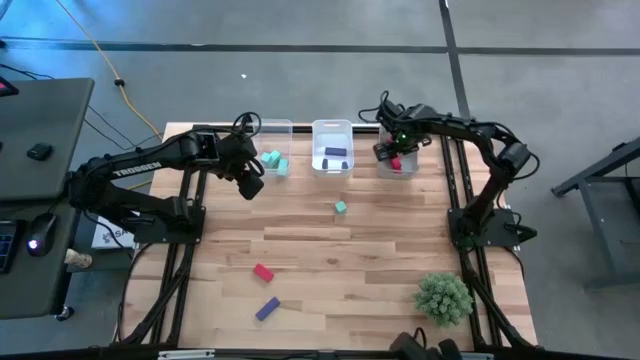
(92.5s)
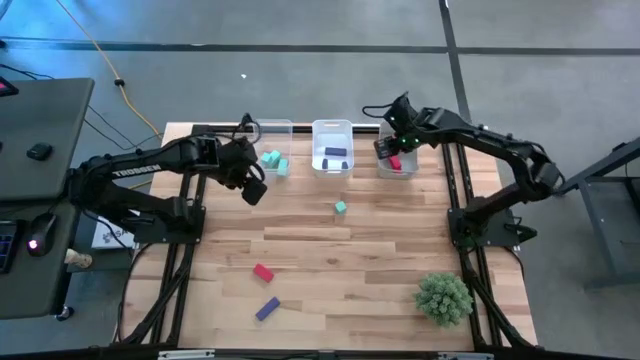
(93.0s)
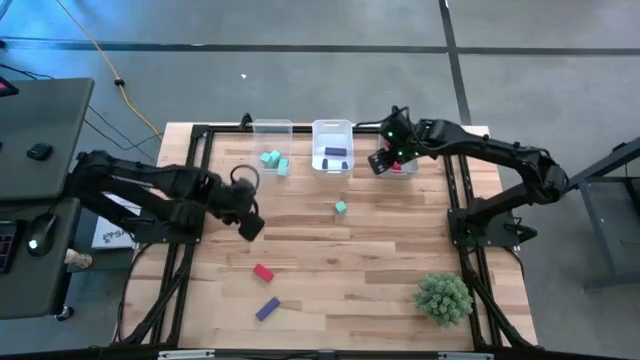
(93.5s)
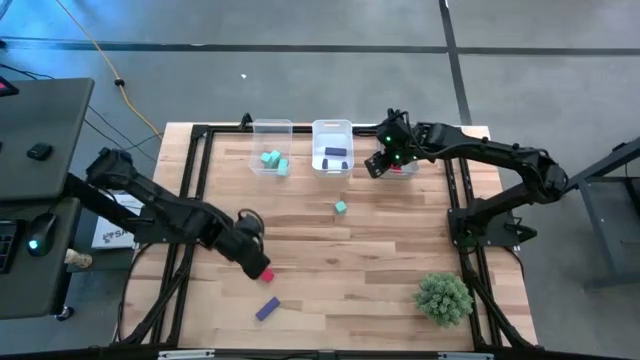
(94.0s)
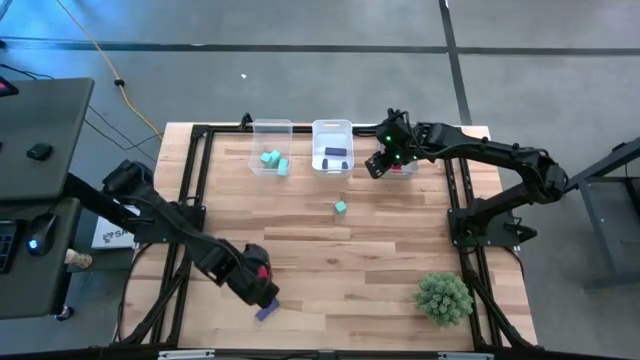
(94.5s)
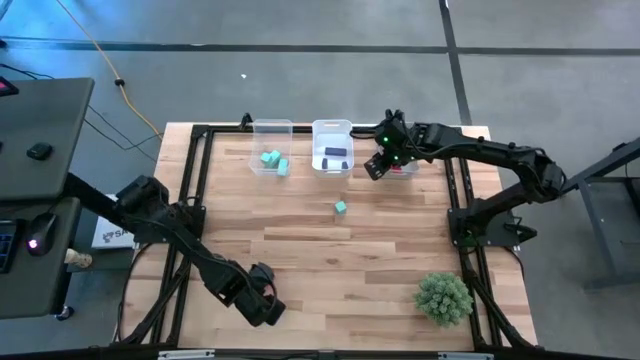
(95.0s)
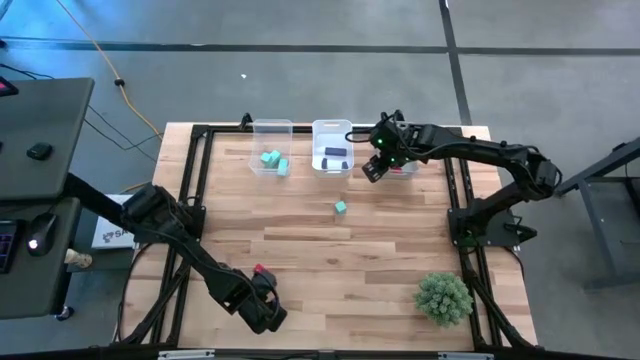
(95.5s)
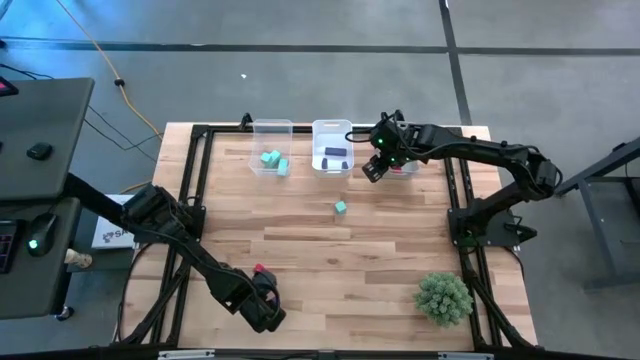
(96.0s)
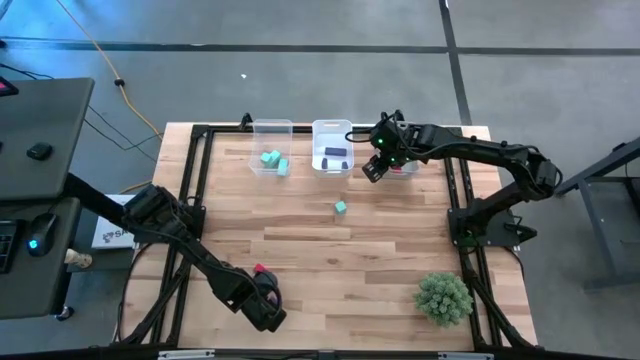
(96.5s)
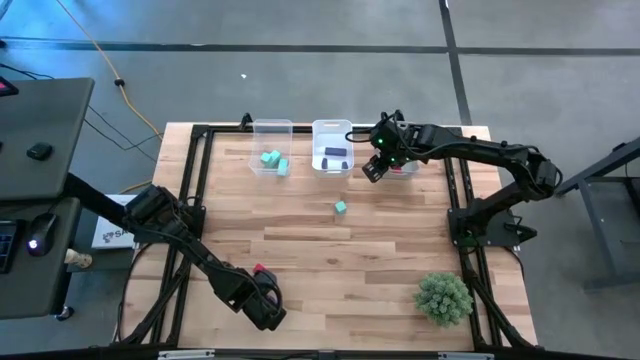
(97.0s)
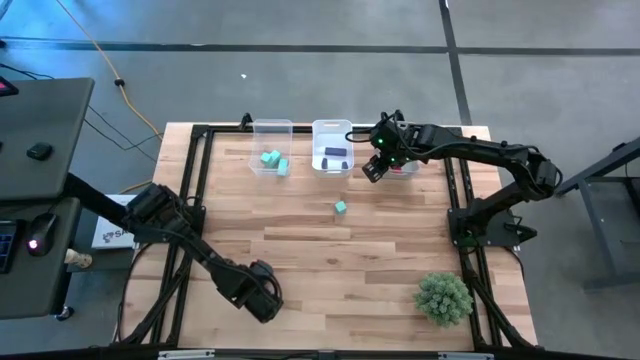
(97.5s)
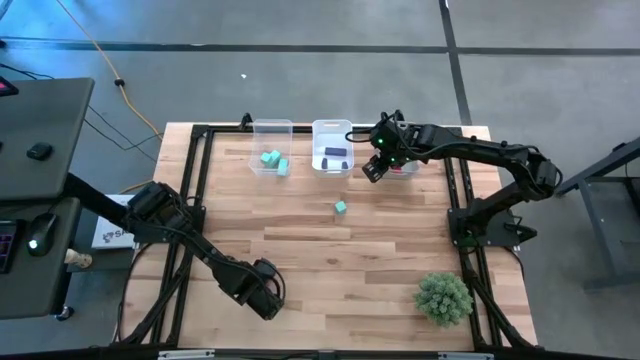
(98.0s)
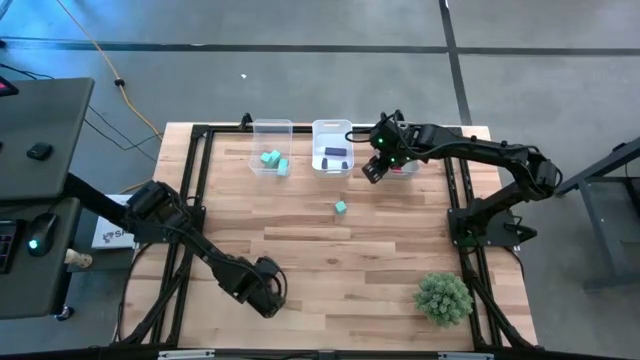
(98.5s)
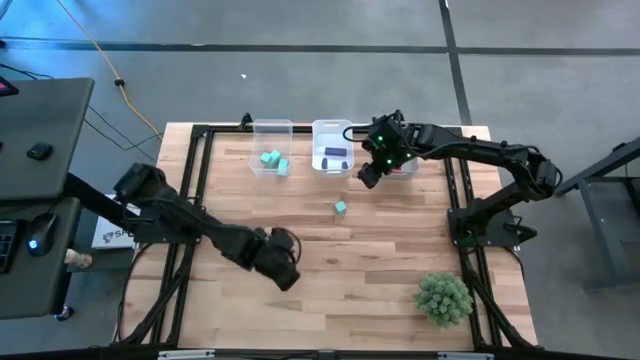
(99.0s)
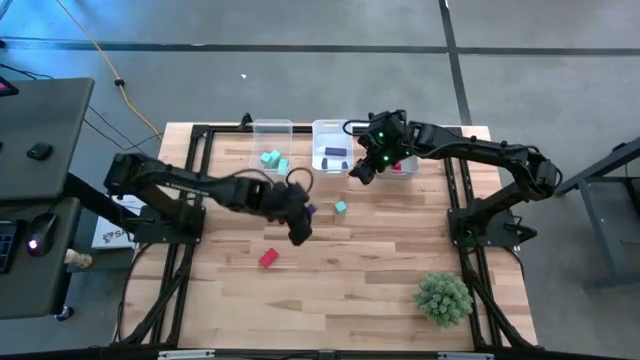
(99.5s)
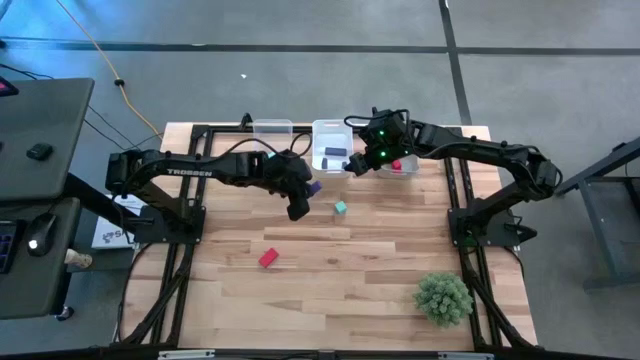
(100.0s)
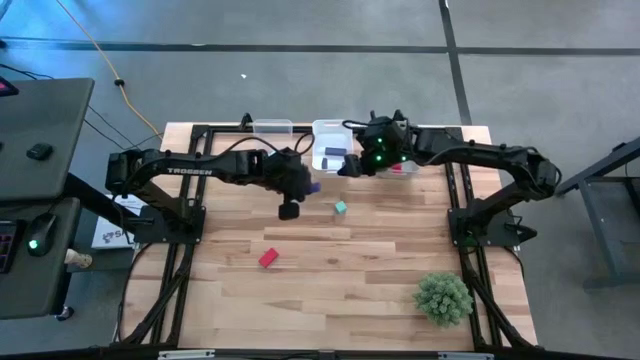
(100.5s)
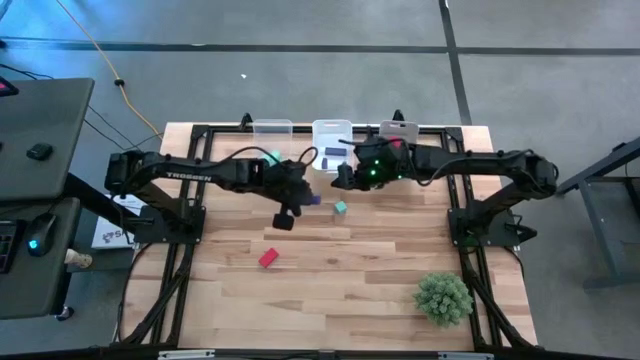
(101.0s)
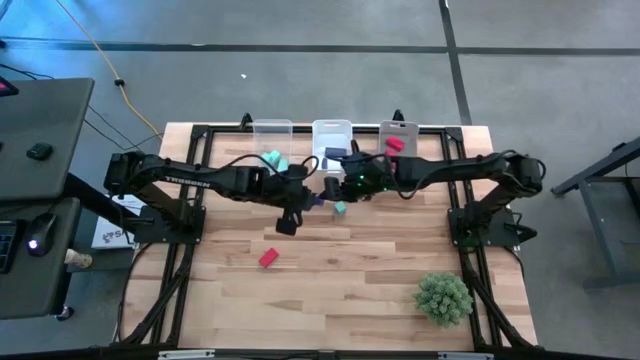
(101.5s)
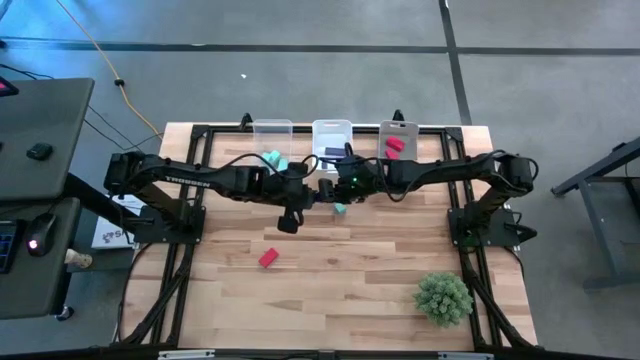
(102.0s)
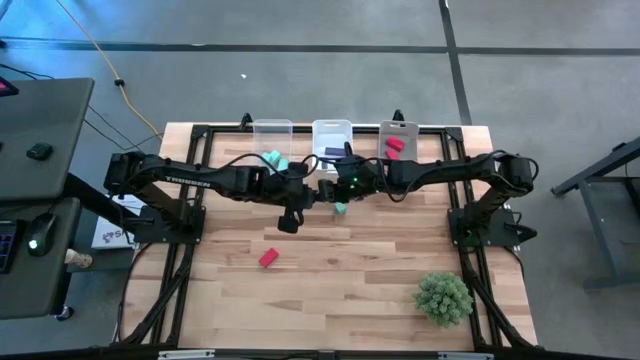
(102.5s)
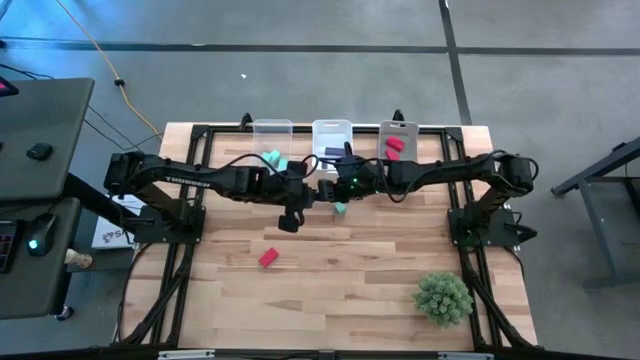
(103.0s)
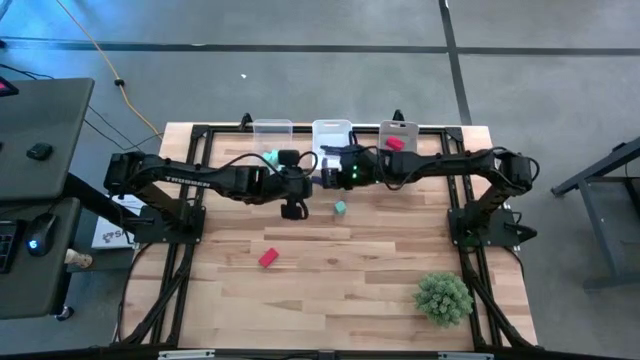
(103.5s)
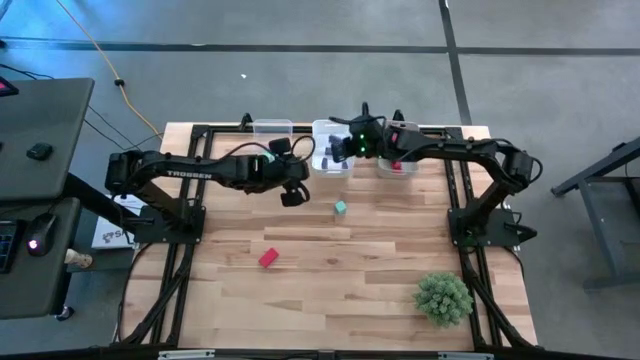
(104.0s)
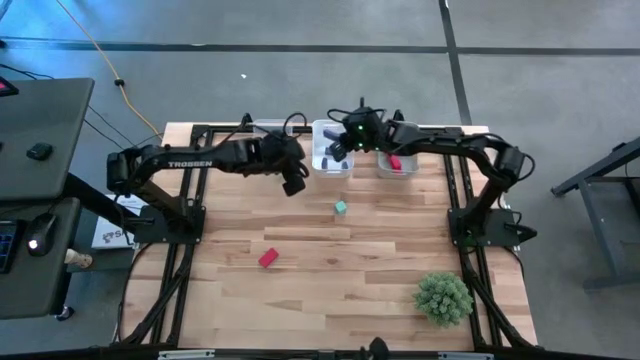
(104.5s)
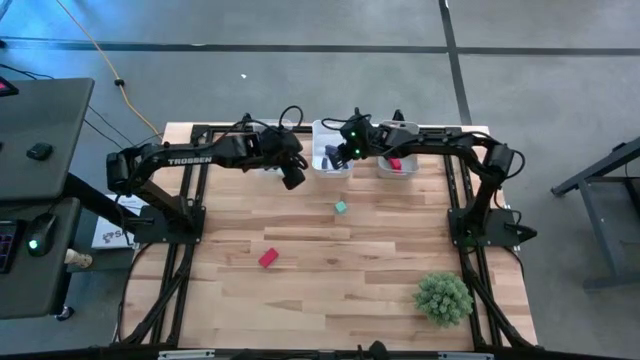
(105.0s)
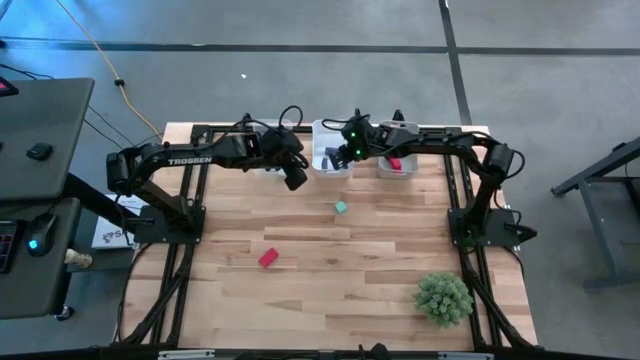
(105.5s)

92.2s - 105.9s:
Task: Sort & place blocks by color
Put the blue block into the white bin

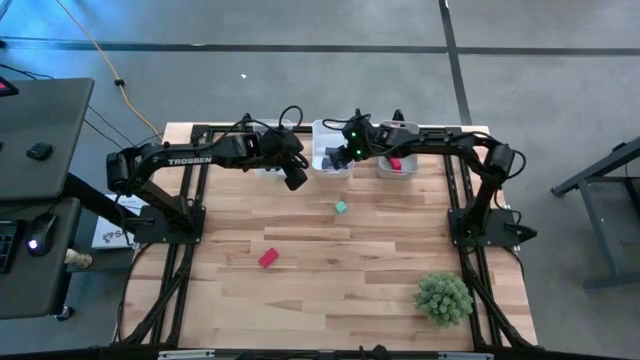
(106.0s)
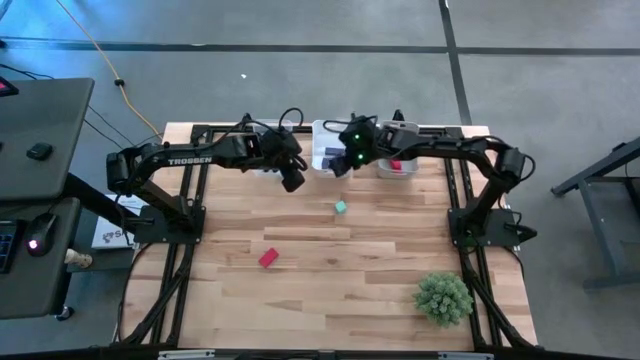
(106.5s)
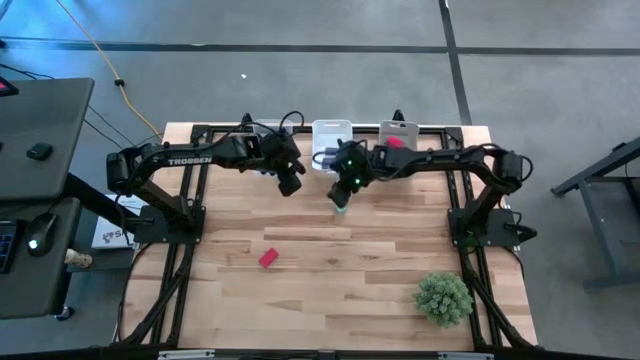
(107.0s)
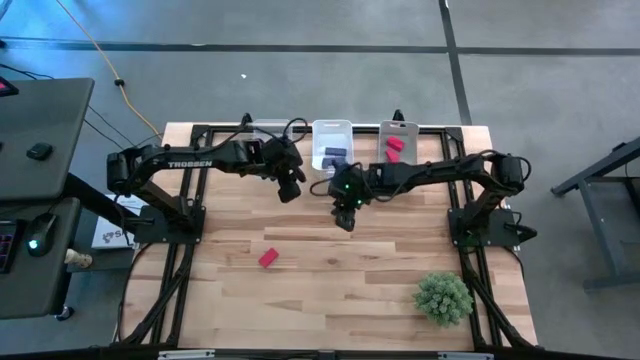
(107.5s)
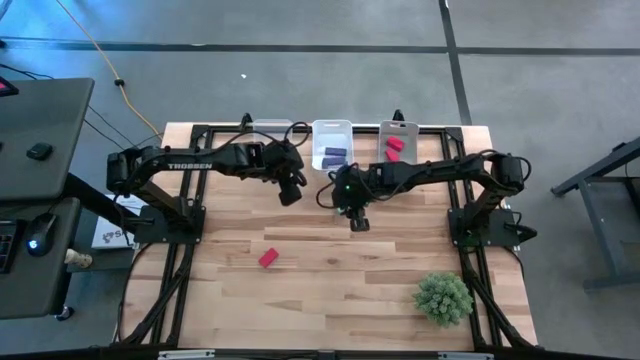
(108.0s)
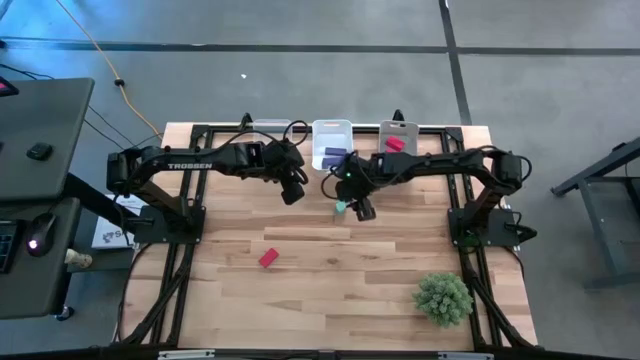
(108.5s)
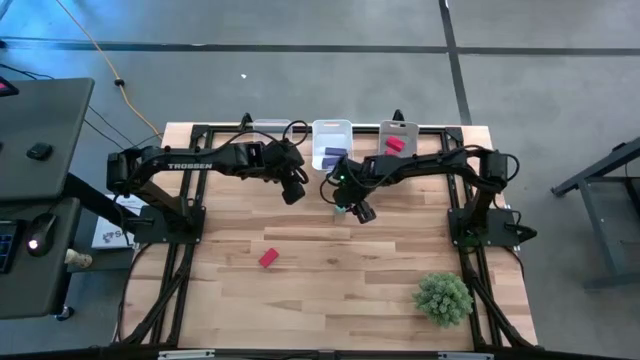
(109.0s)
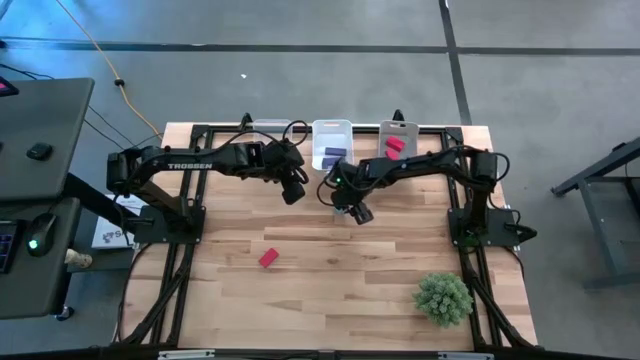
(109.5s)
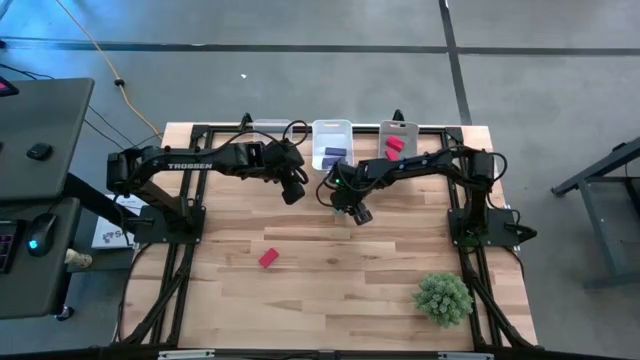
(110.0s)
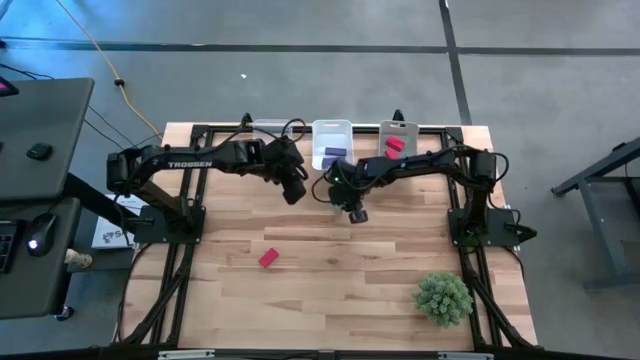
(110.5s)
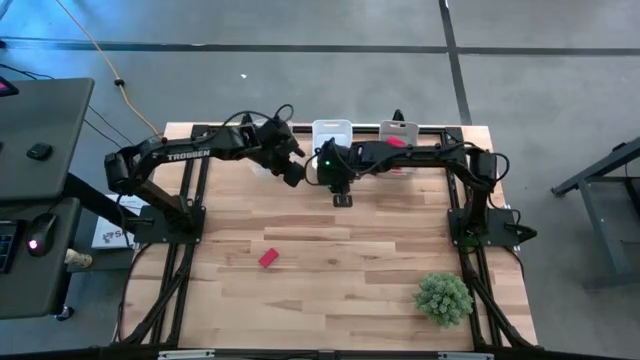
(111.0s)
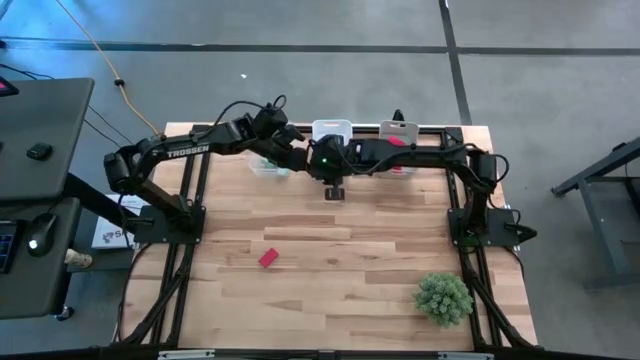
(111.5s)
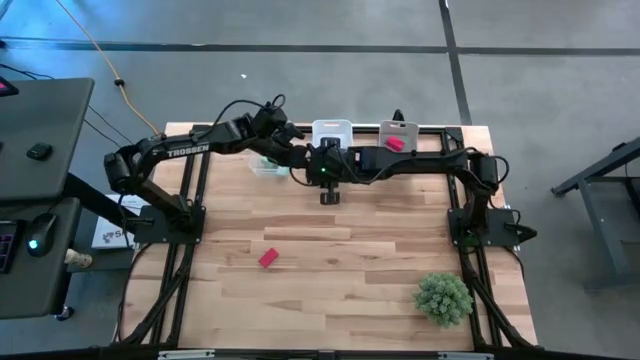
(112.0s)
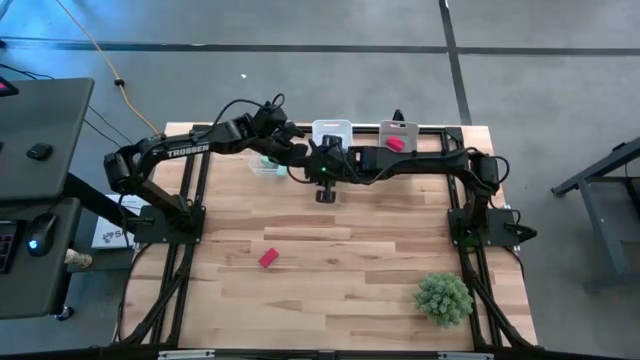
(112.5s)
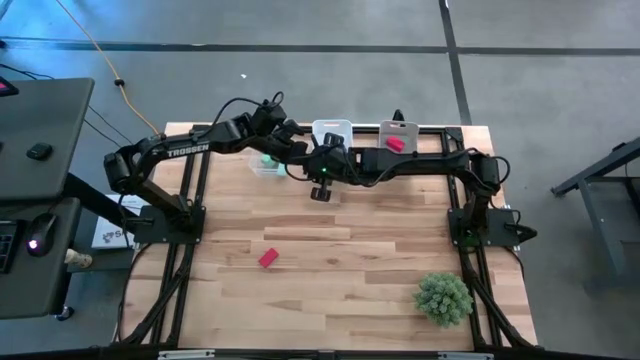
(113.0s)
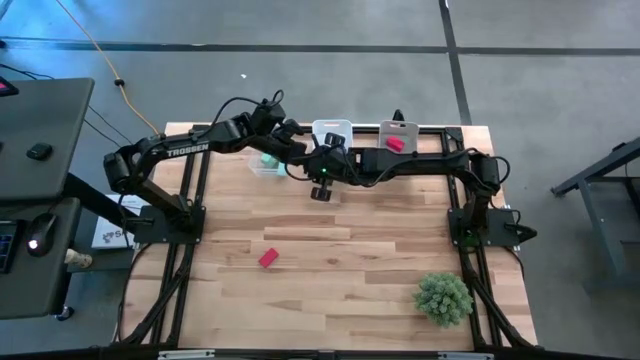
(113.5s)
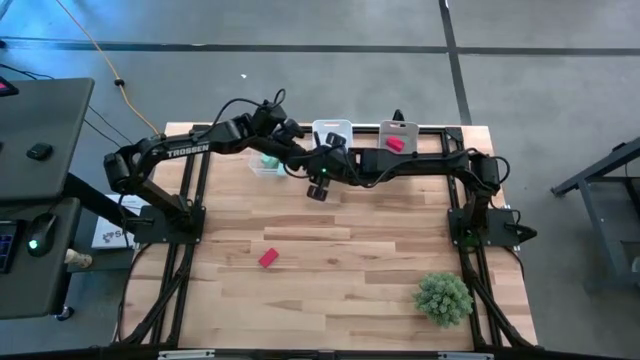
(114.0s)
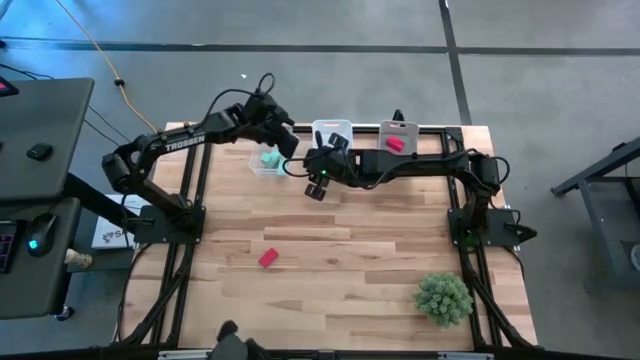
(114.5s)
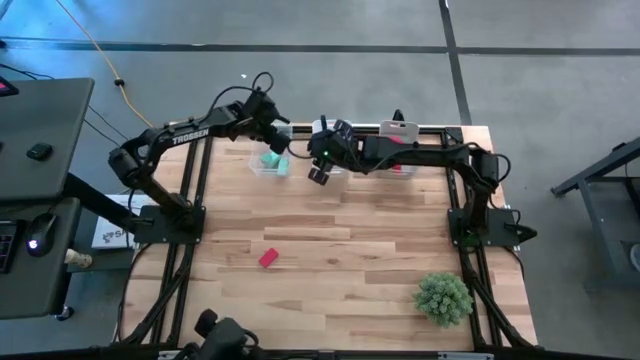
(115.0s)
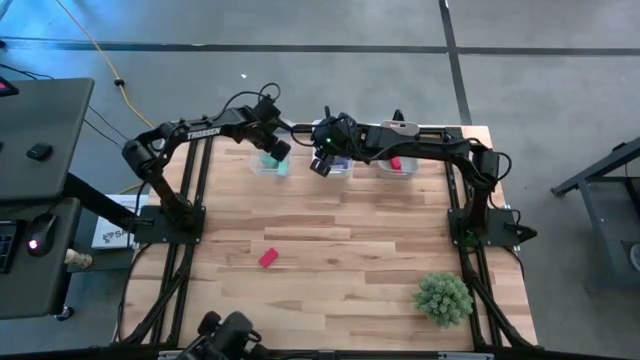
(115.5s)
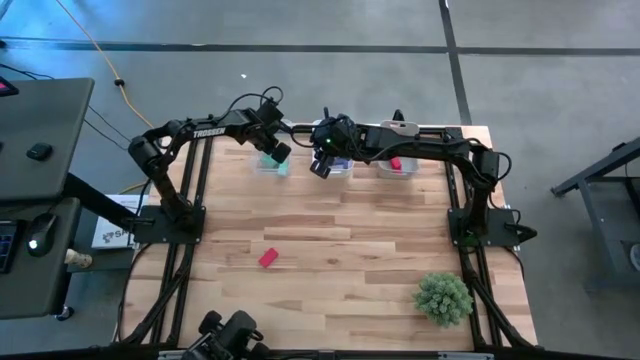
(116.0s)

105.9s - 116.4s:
Put the light blue block into the transparent bin
